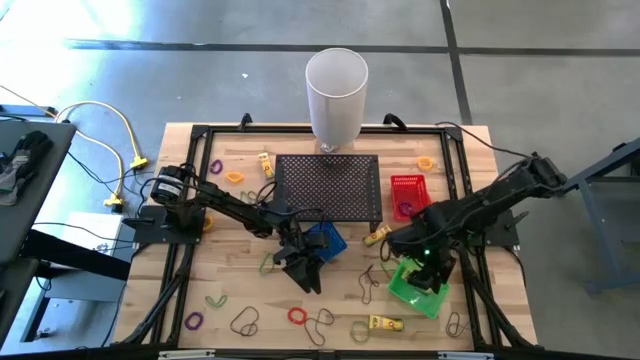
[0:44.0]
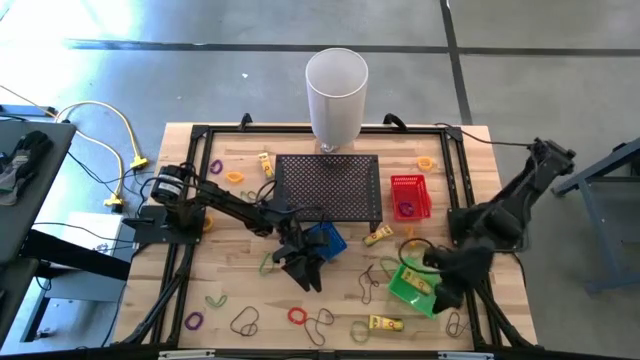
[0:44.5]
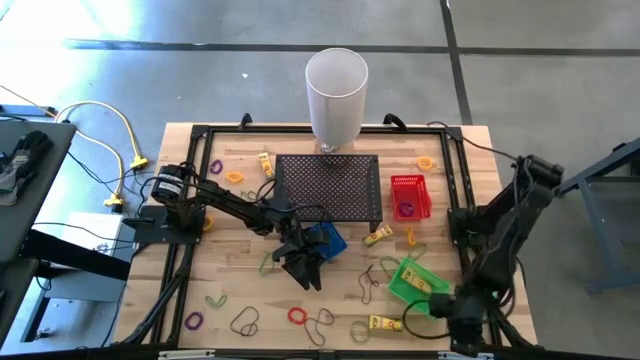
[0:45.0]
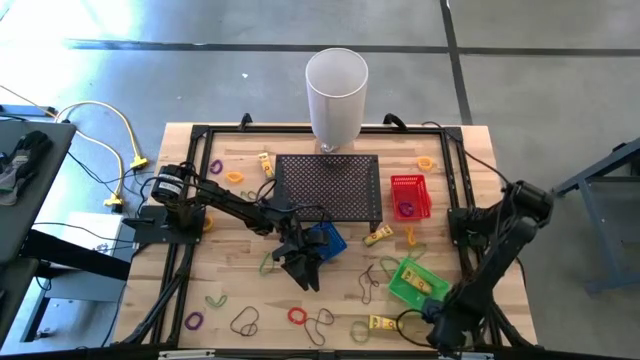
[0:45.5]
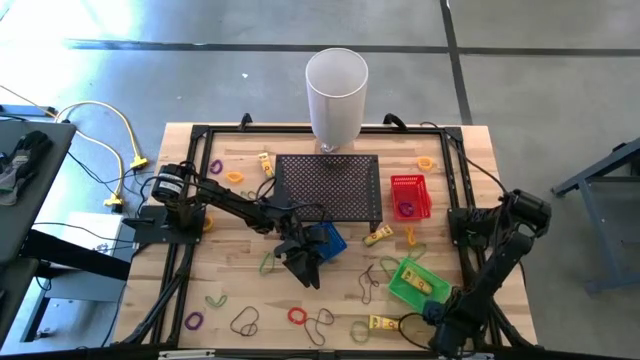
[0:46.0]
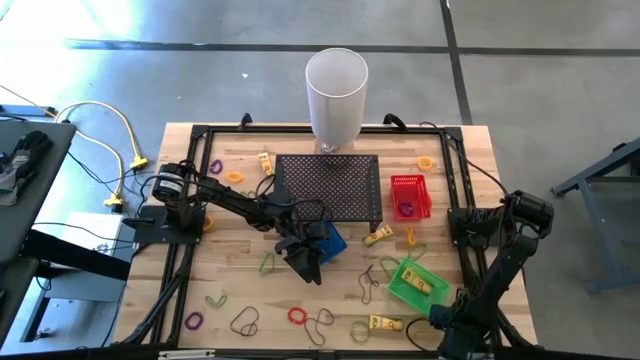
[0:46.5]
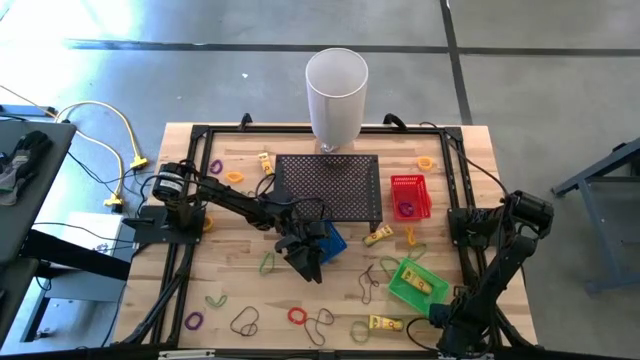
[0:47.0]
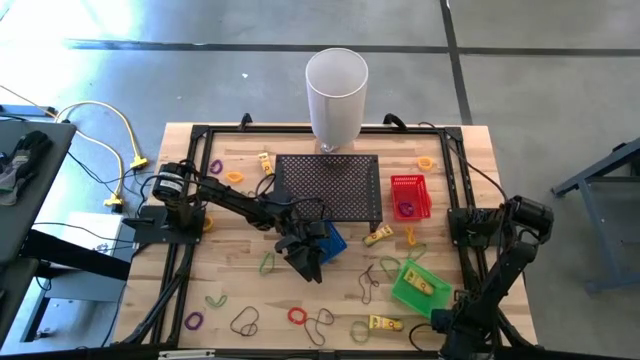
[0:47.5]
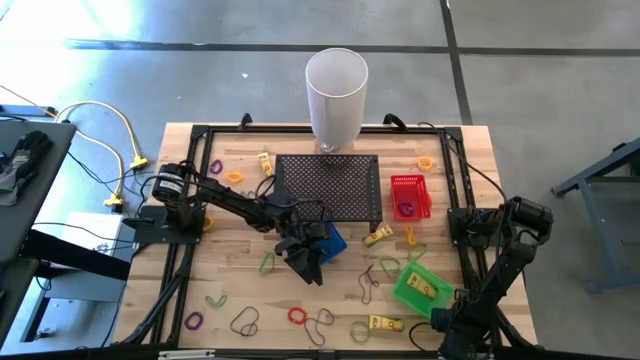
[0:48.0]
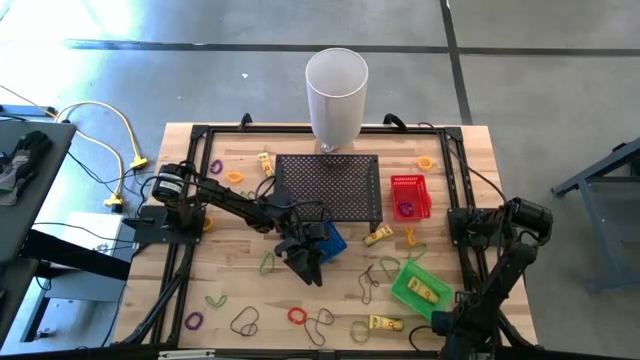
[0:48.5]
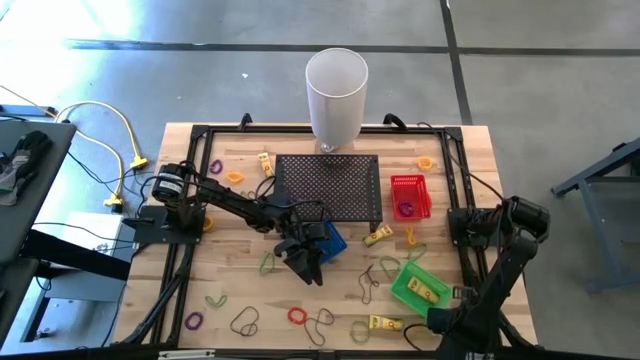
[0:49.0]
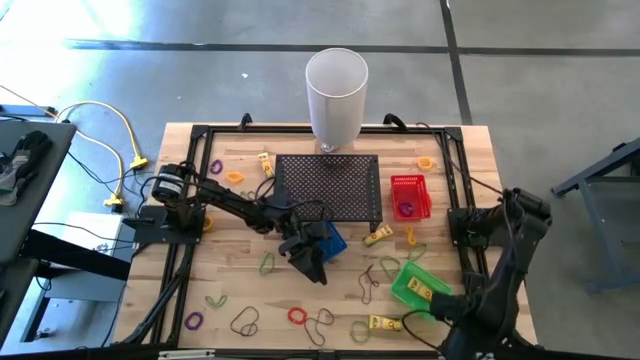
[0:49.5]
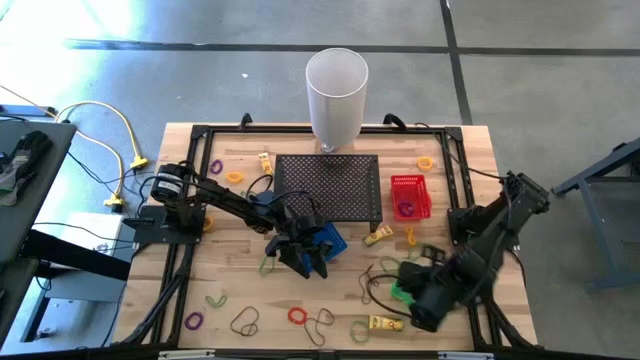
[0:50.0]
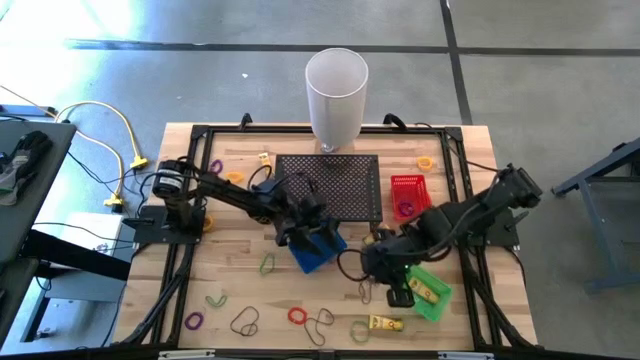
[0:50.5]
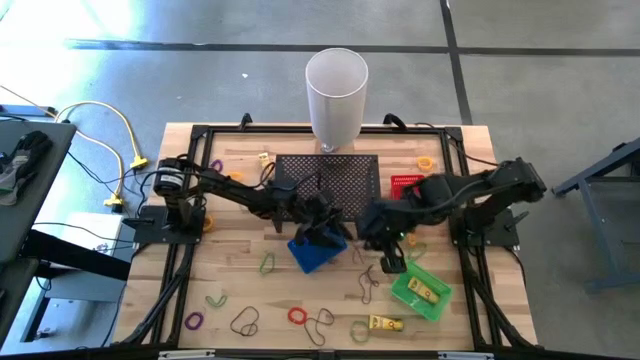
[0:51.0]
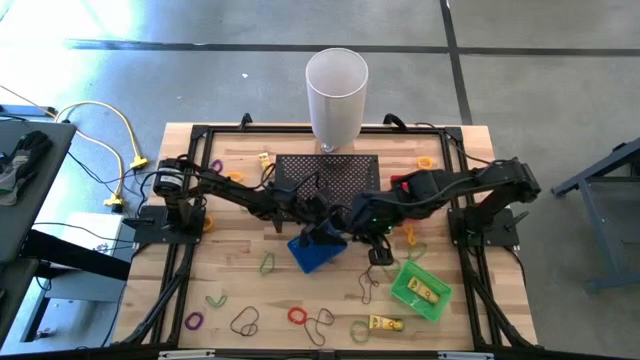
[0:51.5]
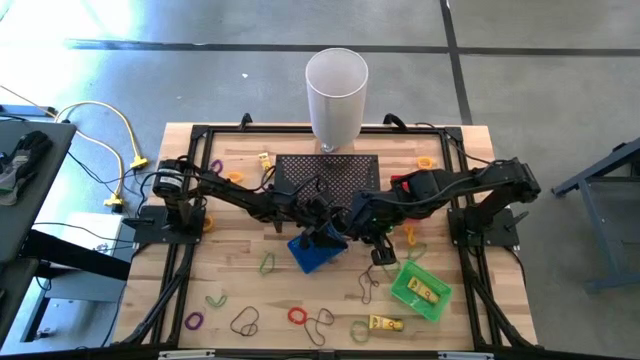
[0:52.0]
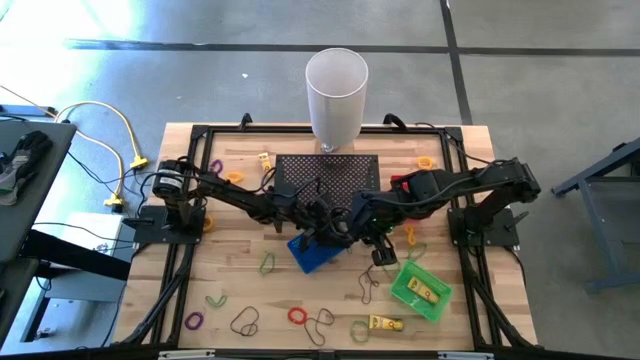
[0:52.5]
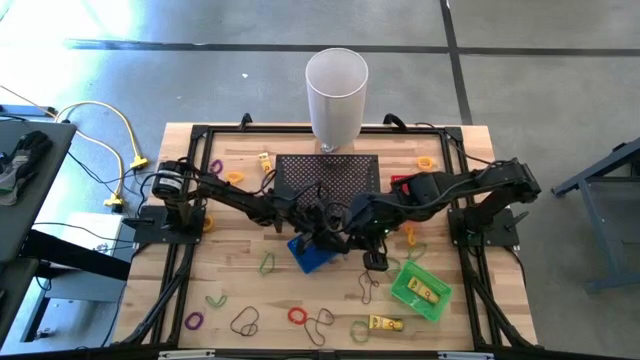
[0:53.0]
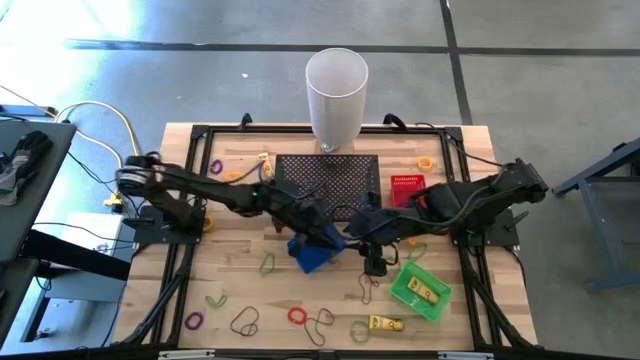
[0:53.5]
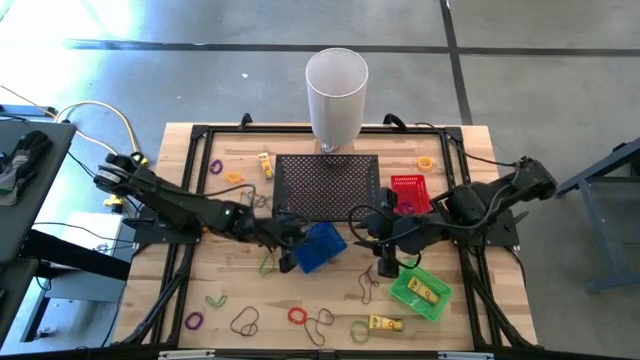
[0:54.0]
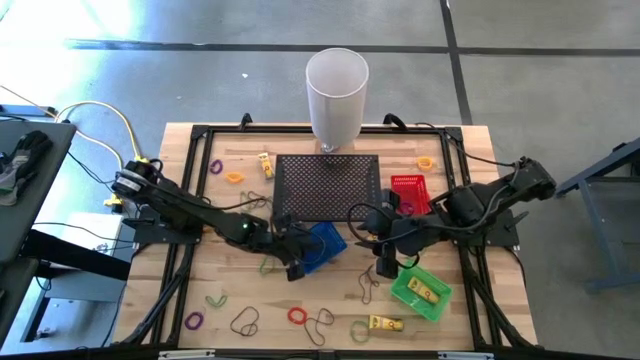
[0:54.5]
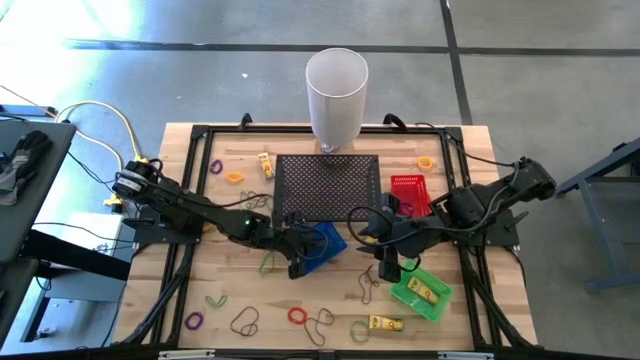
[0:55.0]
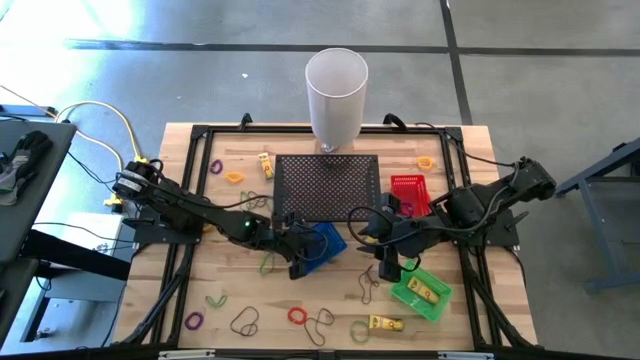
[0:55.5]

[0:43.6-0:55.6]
Task: Pick & Place Office Desk Supplies
Put the violet rubber band into the blue bin

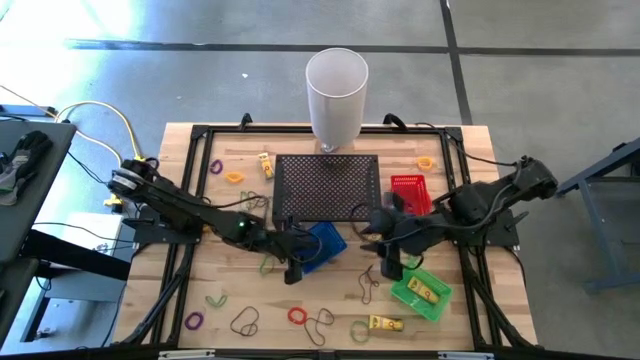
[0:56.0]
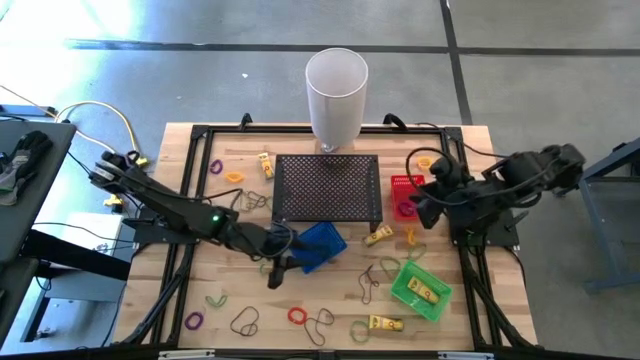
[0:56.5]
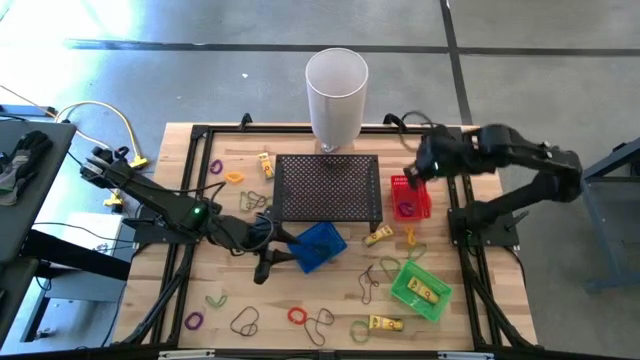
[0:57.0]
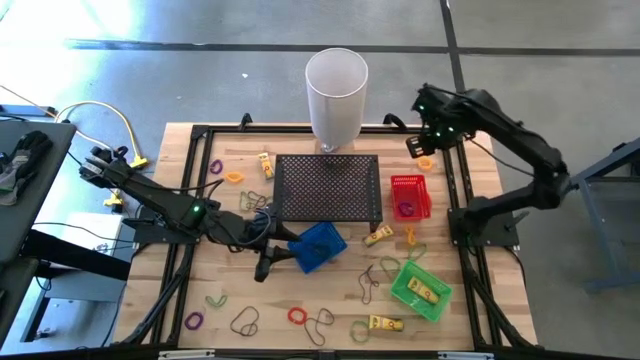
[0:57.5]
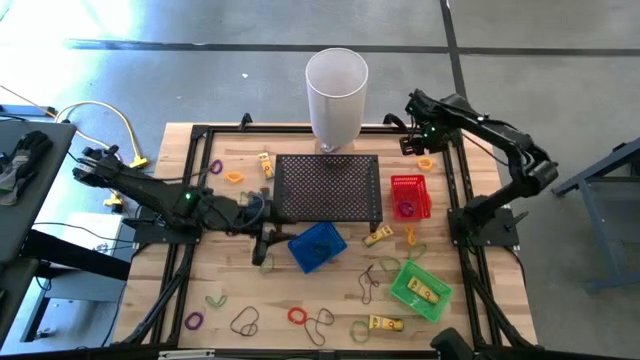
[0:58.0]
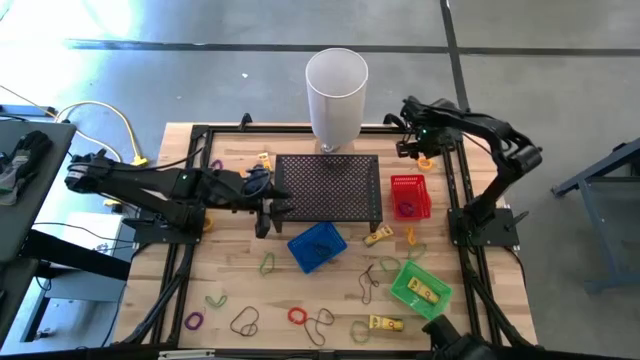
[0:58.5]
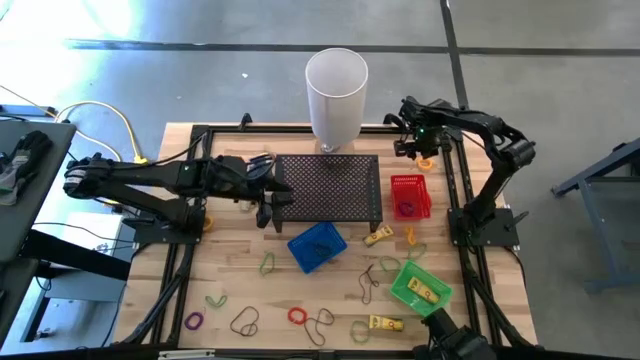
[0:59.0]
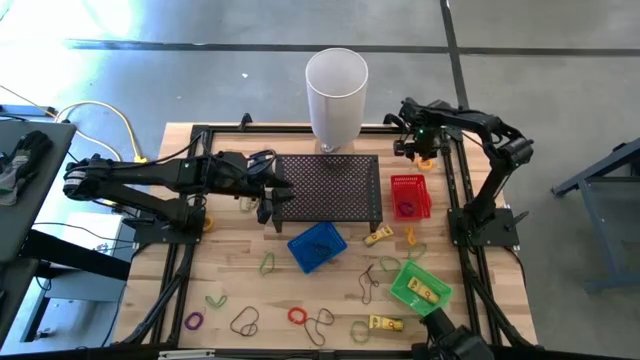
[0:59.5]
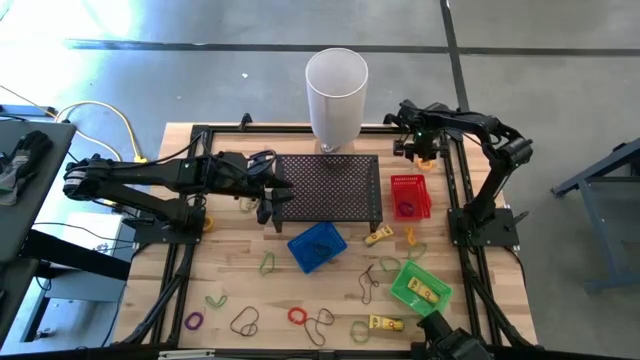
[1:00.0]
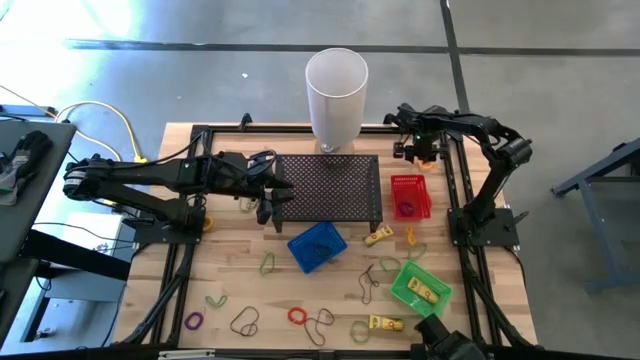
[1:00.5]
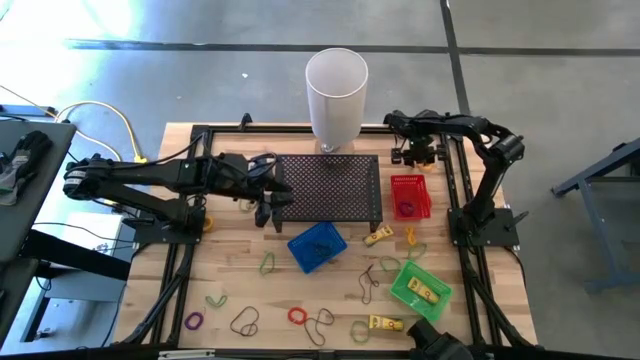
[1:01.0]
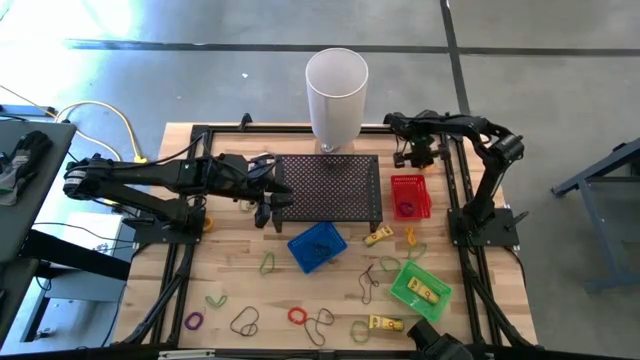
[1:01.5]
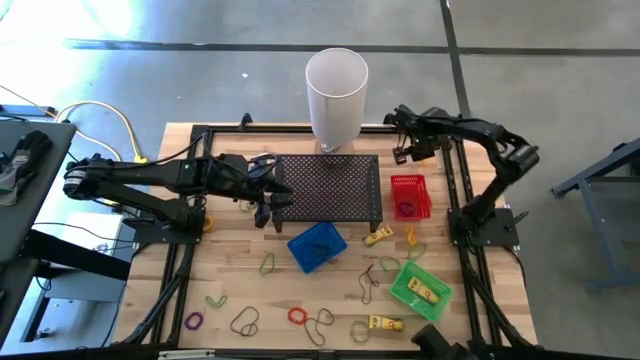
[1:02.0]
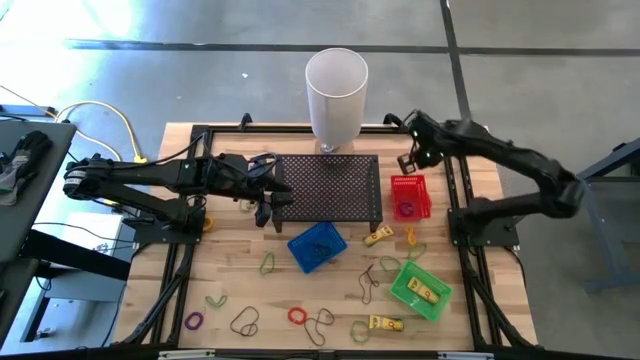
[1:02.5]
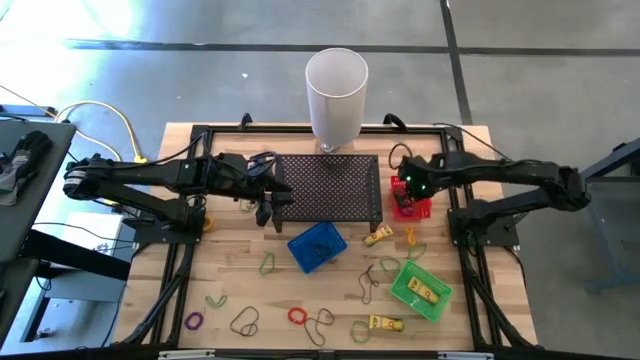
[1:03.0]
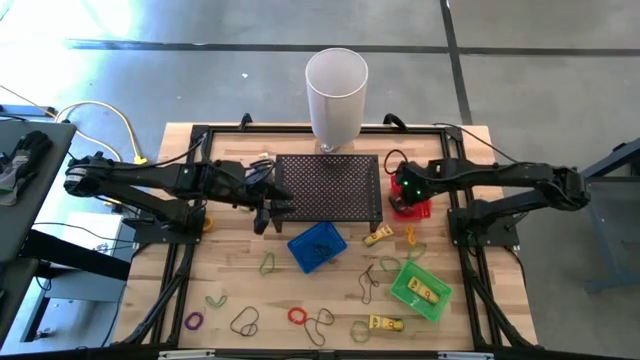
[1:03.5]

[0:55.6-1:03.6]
Put the yellow spring keychain into the red bin

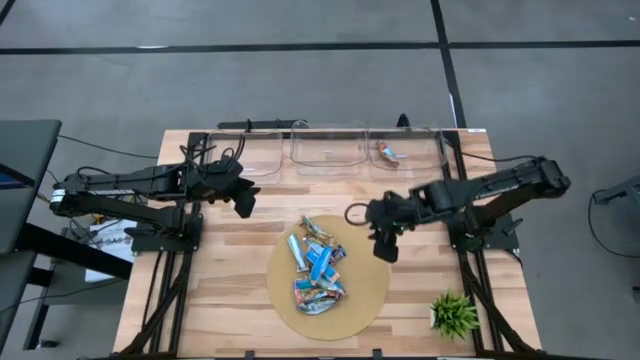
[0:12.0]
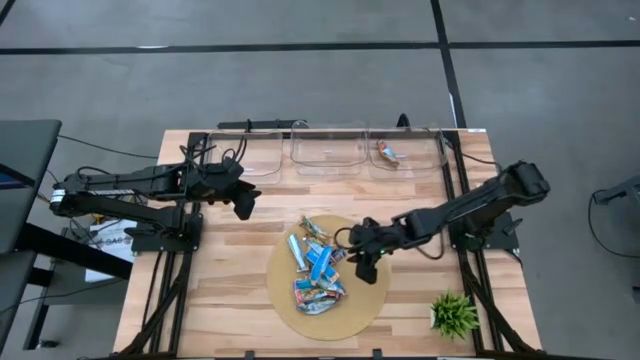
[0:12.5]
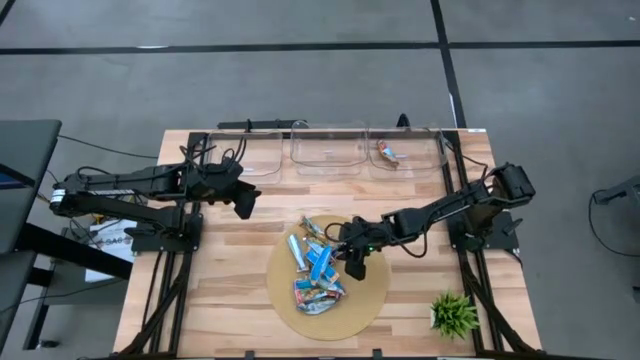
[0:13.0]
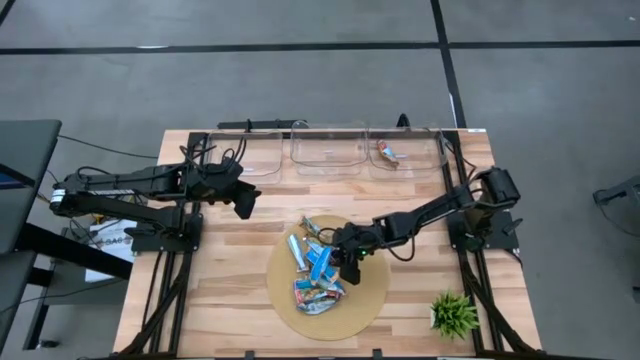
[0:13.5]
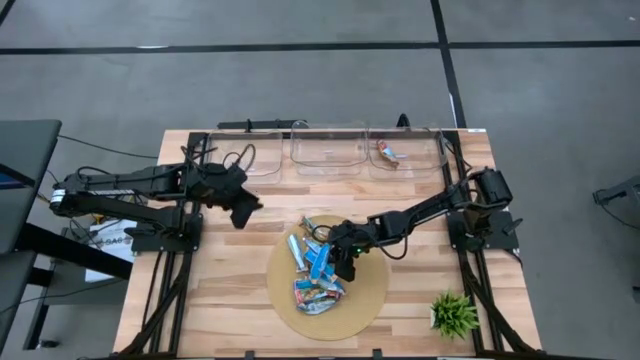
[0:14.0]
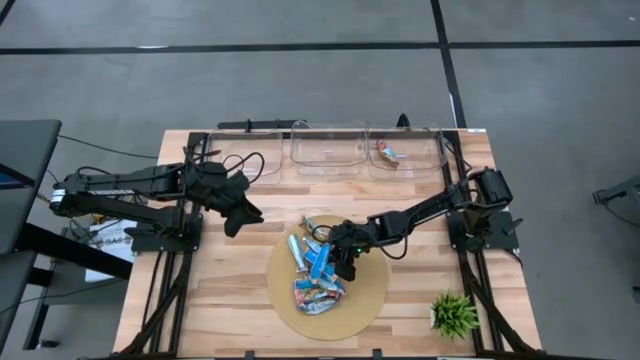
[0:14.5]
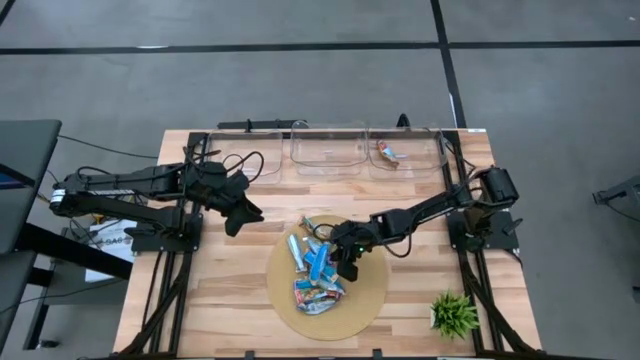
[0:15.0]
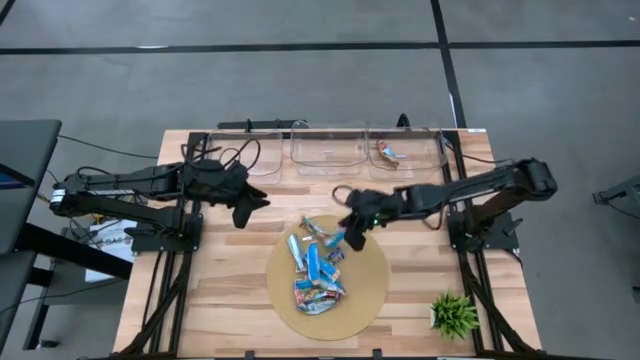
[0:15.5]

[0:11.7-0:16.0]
Task: Pick and place Granola Bars by type
Put the red granola bar into the right transparent bin
